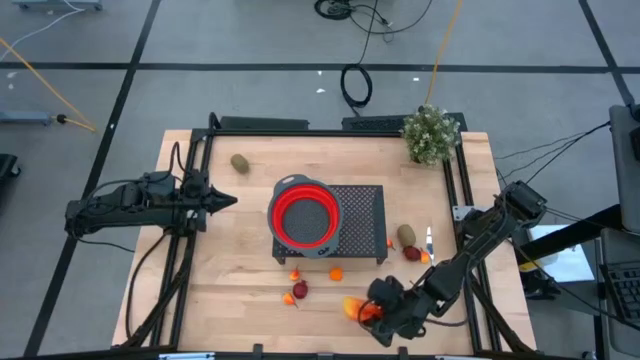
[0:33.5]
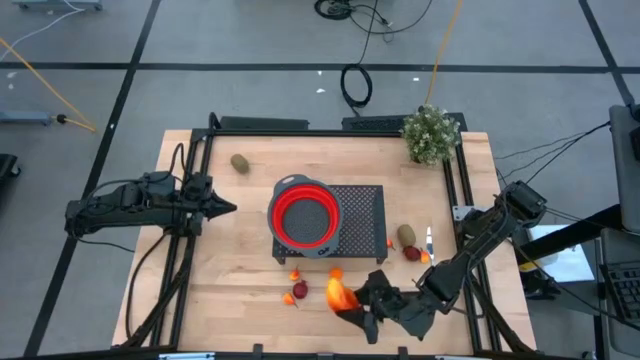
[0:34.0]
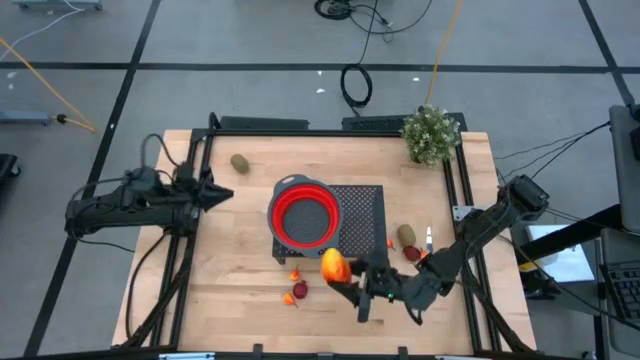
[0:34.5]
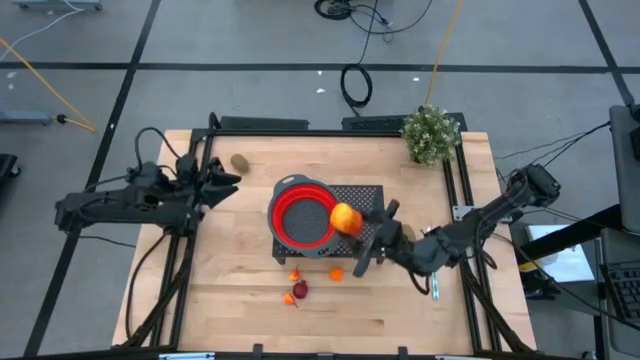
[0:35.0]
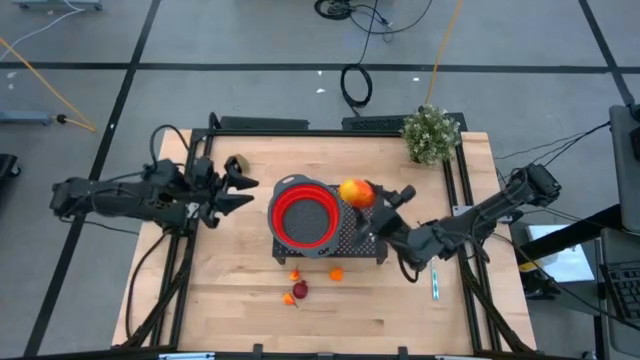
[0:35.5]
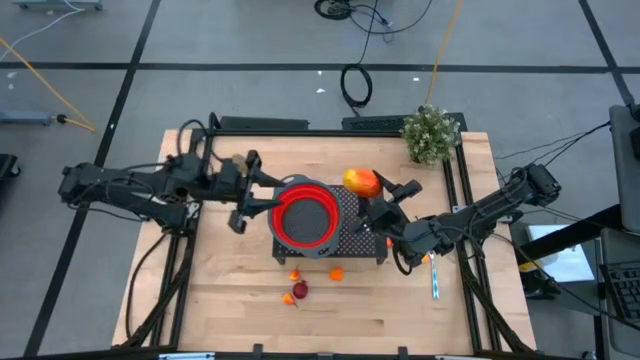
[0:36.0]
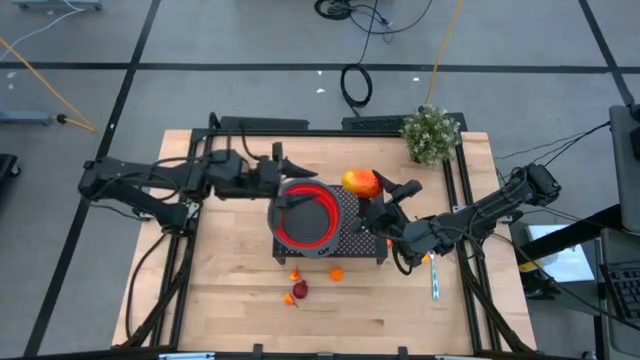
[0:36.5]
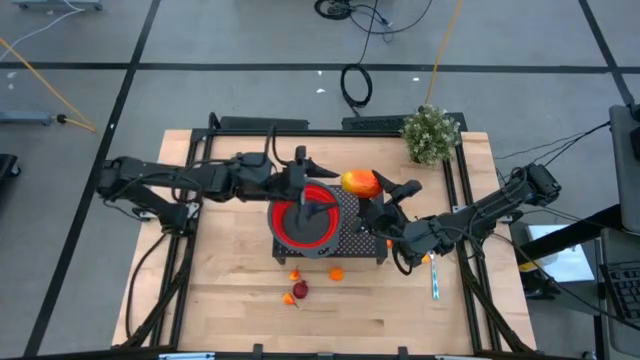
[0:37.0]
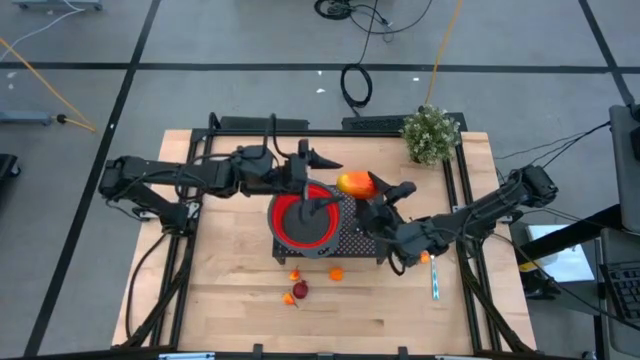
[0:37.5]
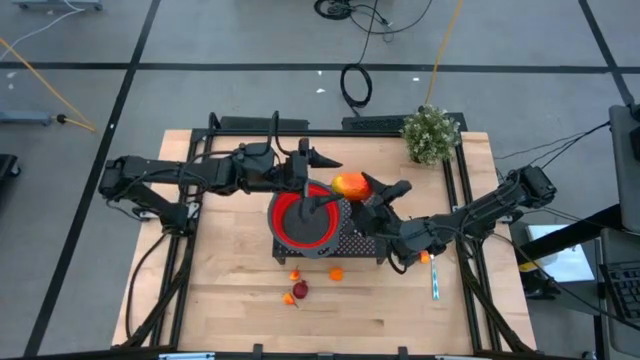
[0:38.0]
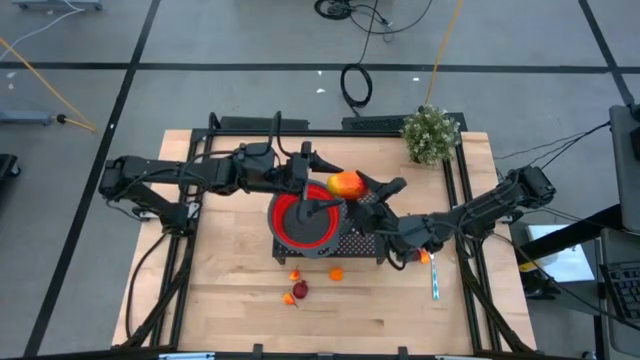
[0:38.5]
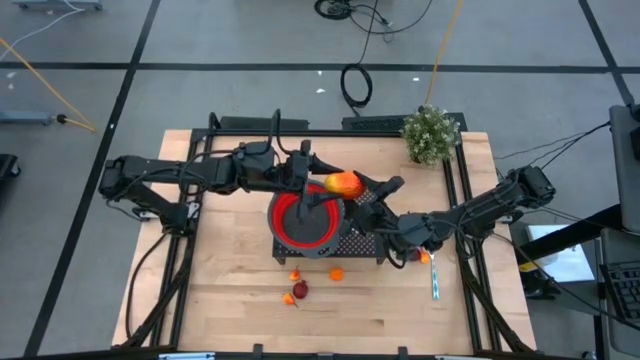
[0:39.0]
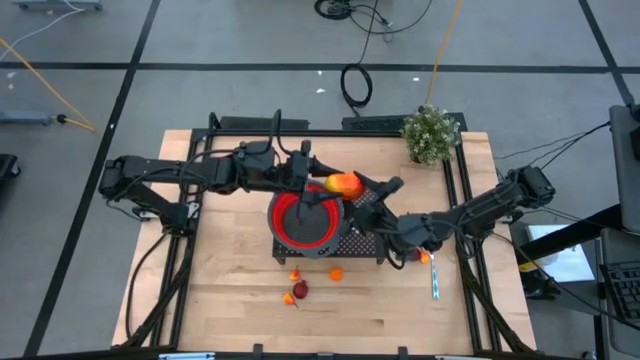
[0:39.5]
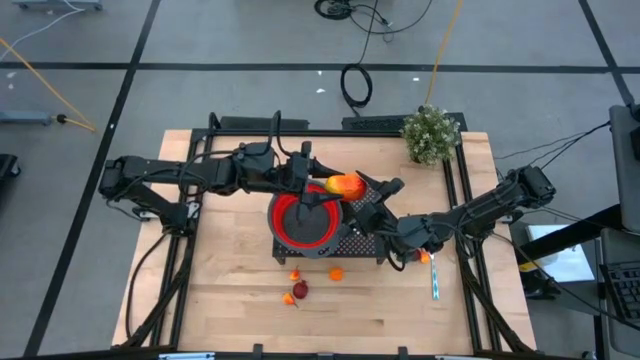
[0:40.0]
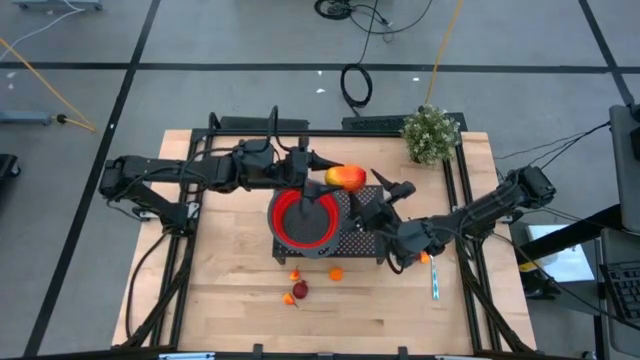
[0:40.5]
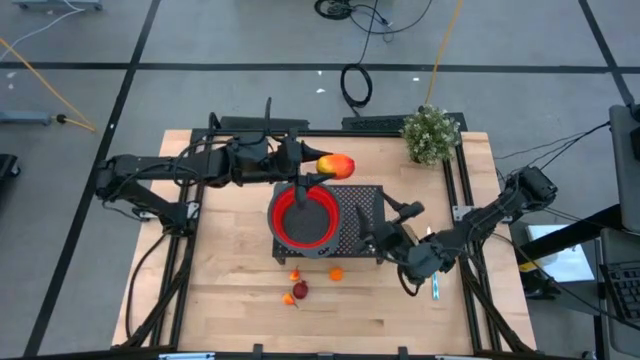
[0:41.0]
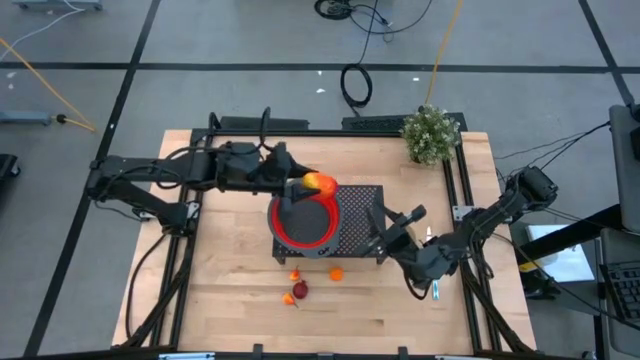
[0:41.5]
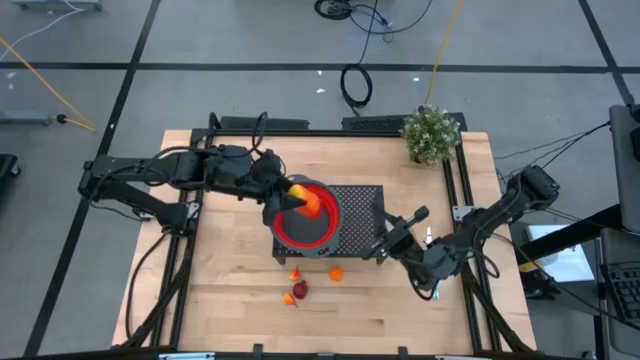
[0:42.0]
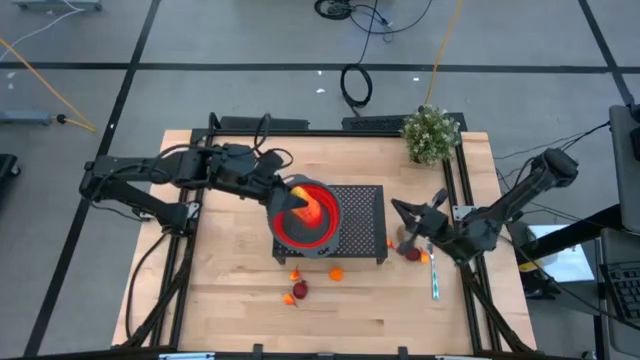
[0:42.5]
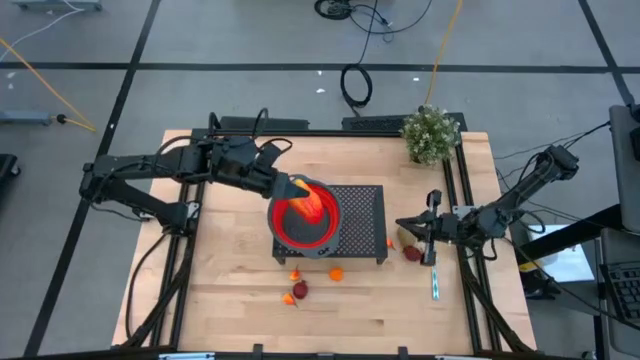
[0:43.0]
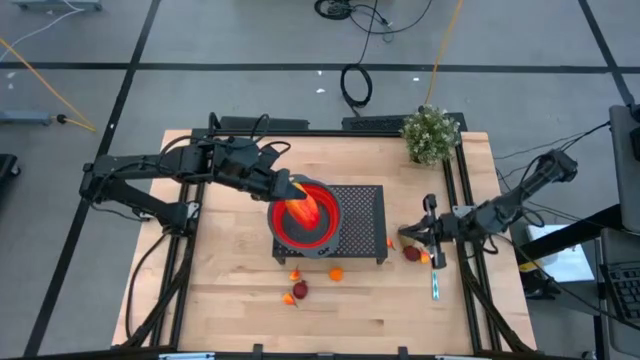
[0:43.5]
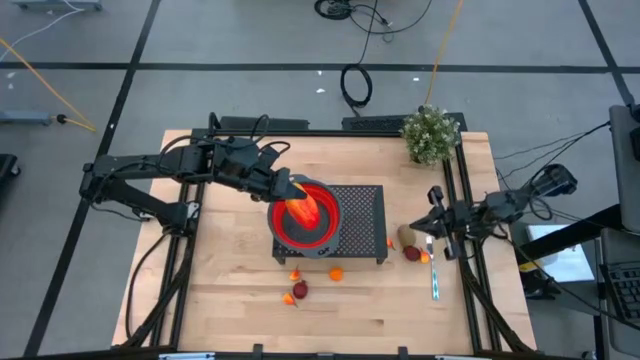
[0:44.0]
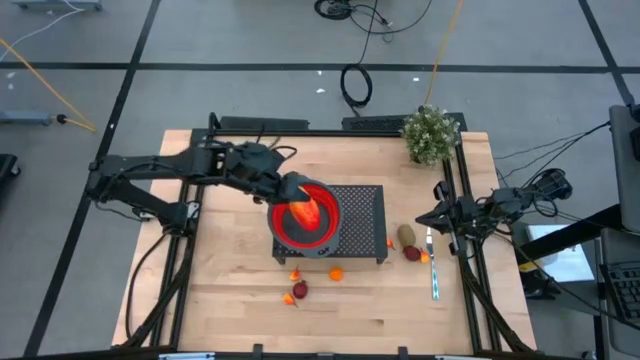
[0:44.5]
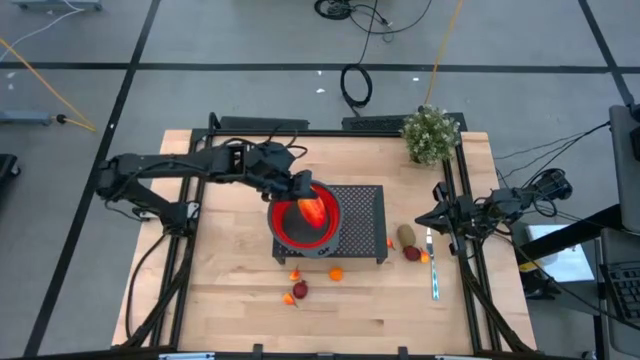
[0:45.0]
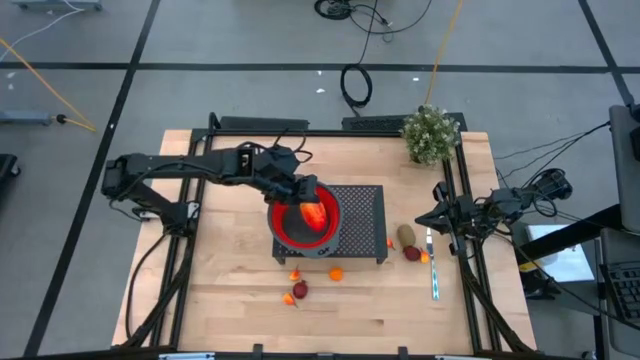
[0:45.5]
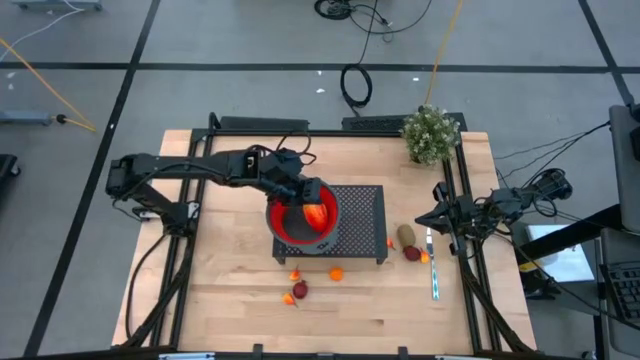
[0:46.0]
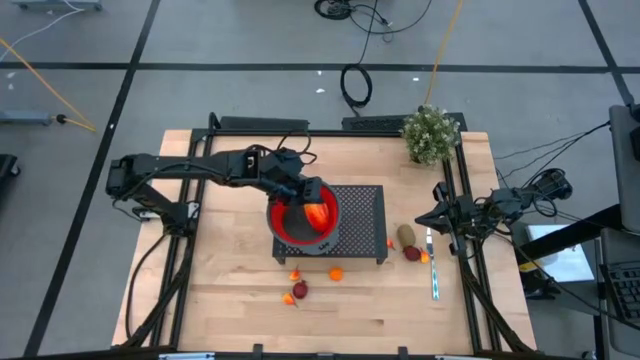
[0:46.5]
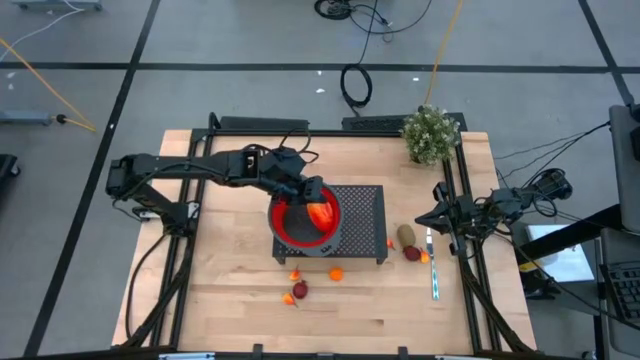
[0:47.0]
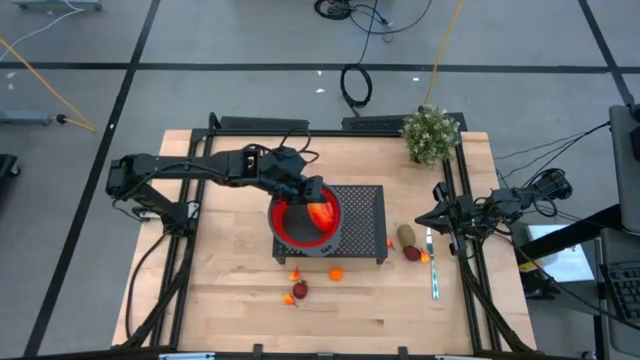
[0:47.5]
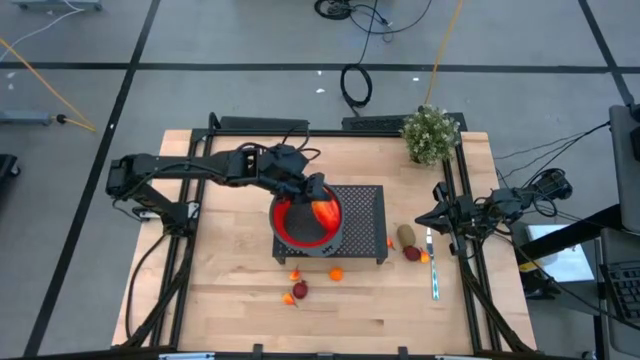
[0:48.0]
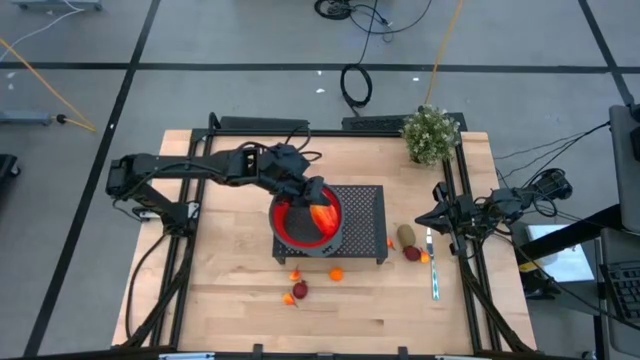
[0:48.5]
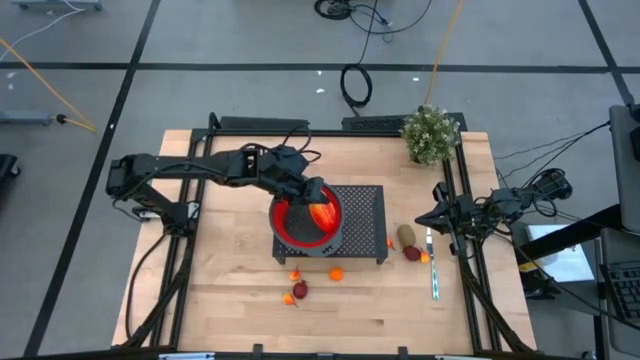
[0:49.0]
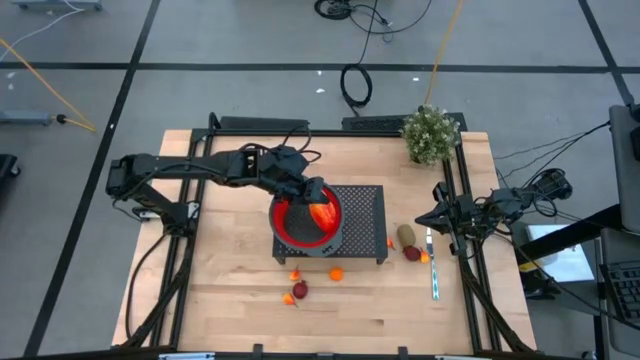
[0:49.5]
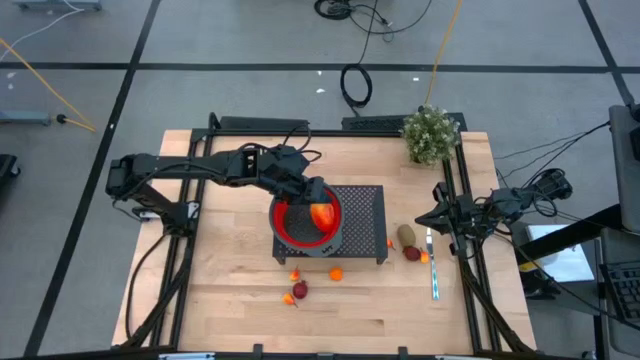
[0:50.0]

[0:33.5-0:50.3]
Task: Pick & Place Fruit
Put the mango into the red colander on the shelf

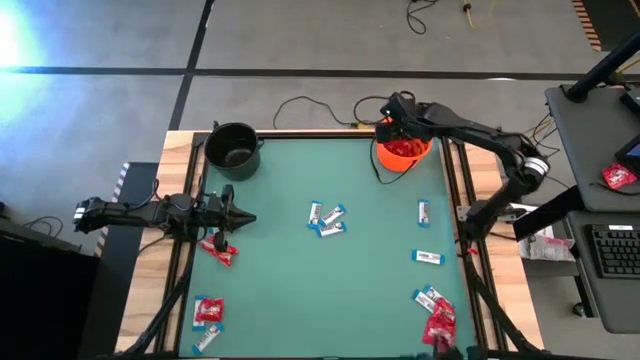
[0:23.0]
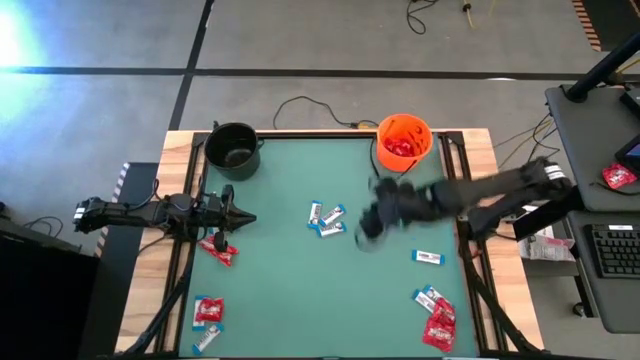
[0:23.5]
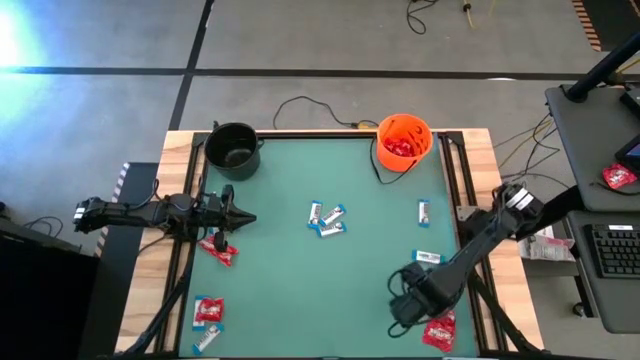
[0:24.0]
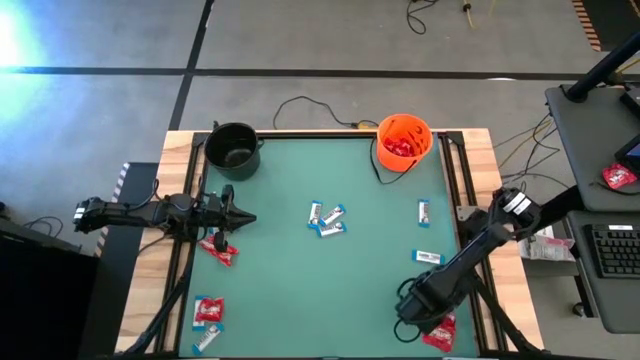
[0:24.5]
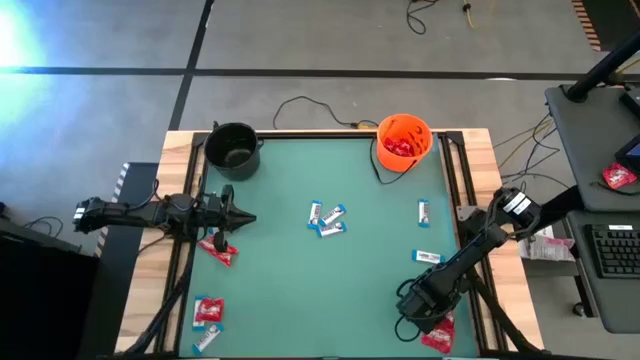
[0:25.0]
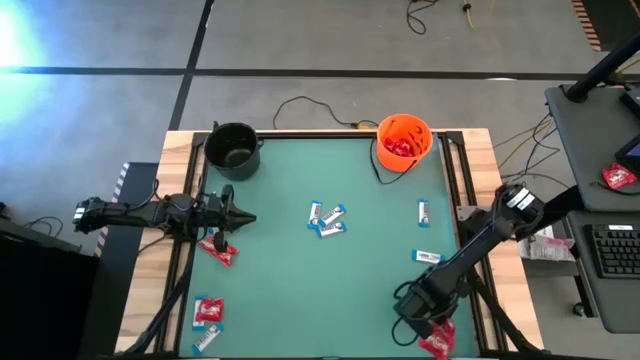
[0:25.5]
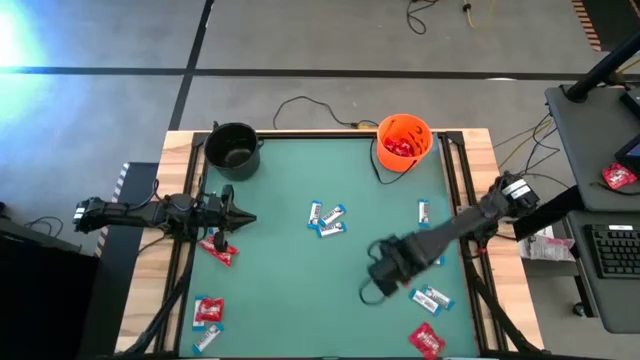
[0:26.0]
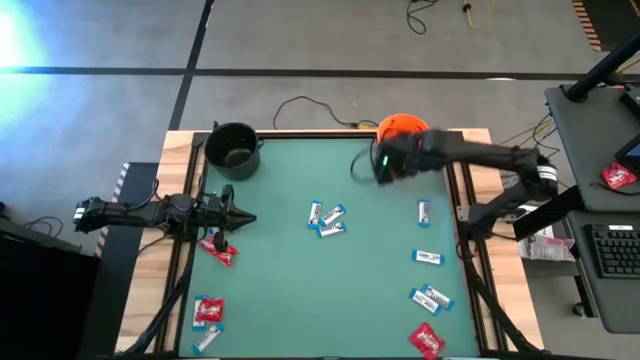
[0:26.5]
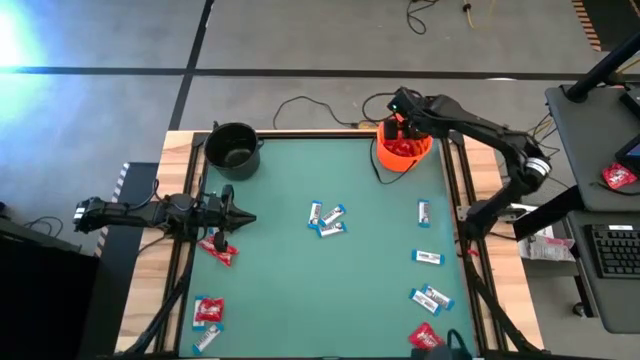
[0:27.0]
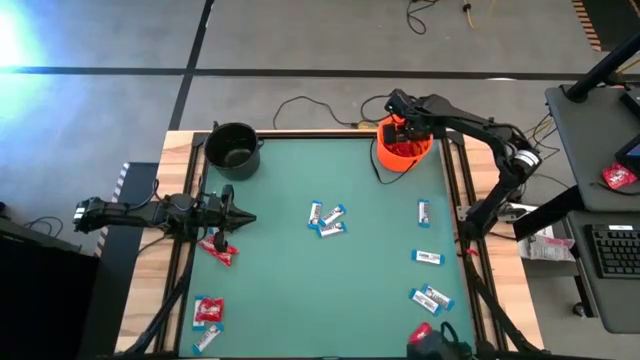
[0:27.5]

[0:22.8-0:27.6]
Task: Sort candy by brand, put in halloween buckets
Put the red candy into the orange bucket
